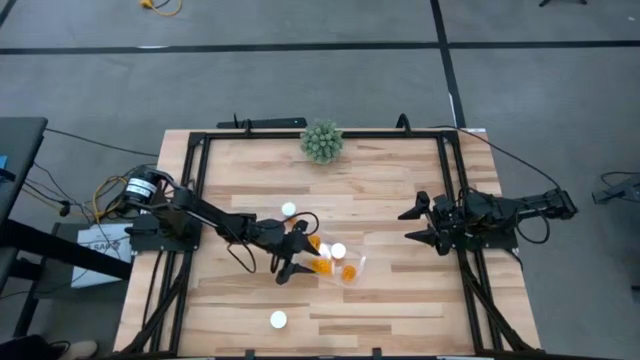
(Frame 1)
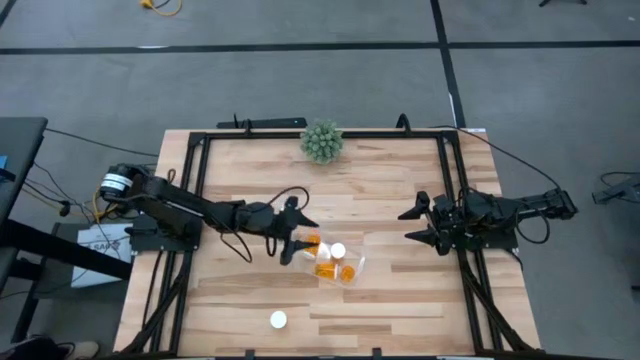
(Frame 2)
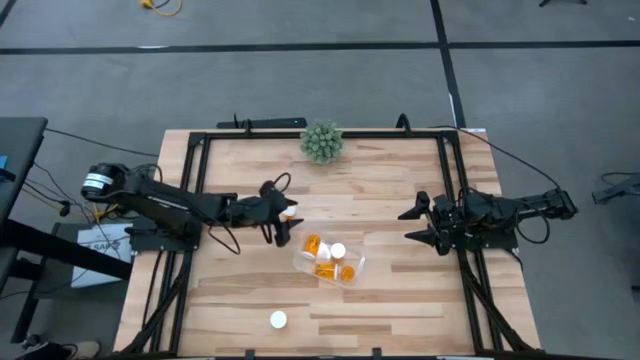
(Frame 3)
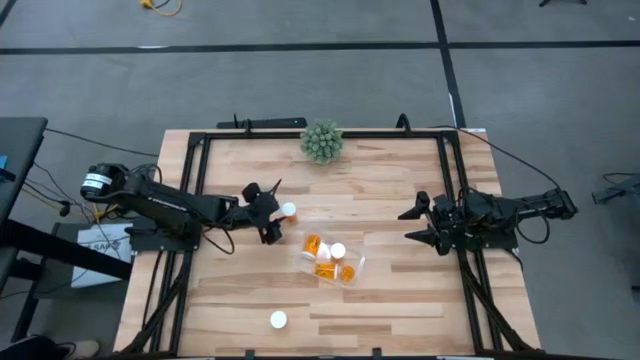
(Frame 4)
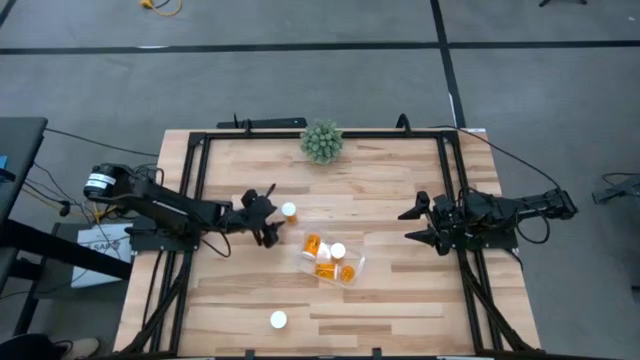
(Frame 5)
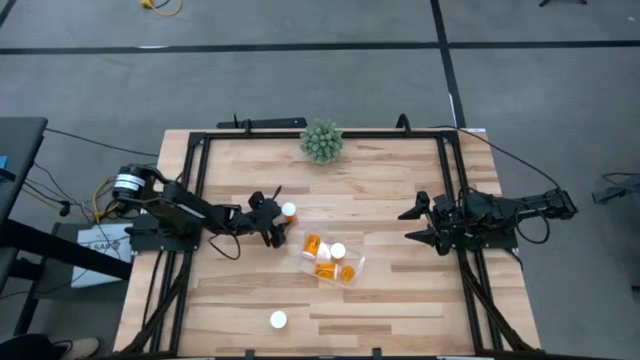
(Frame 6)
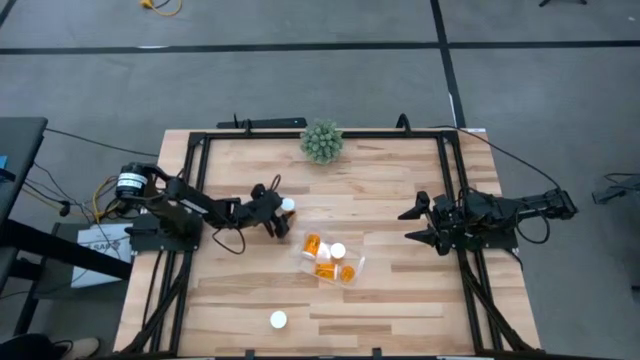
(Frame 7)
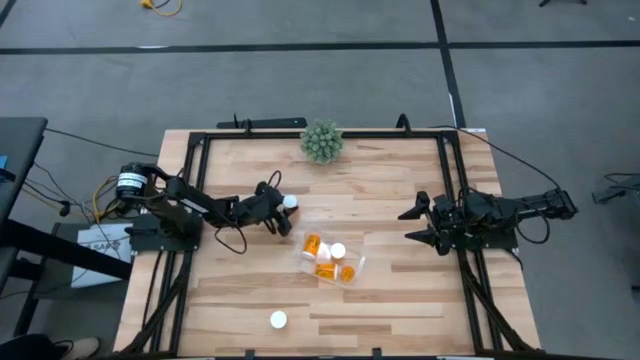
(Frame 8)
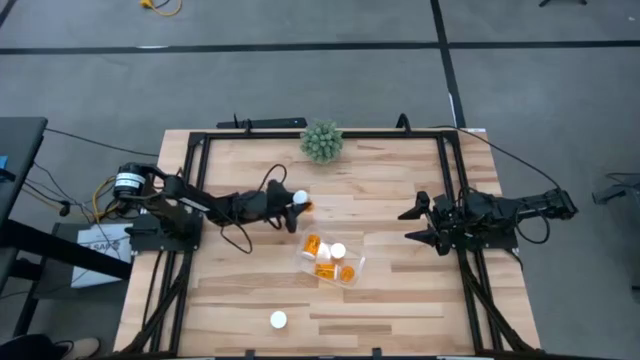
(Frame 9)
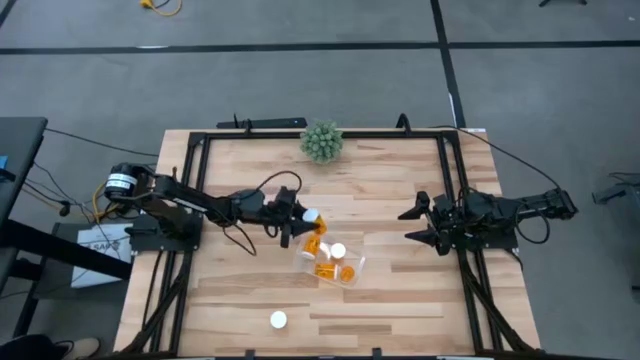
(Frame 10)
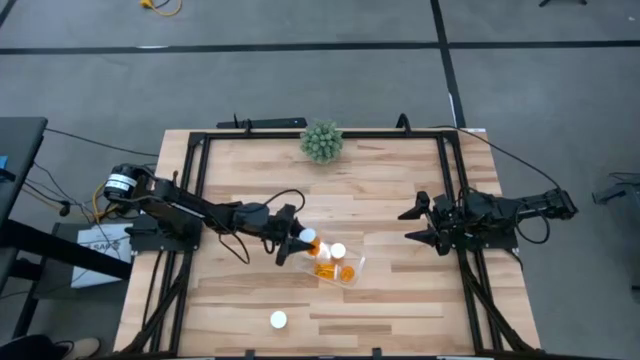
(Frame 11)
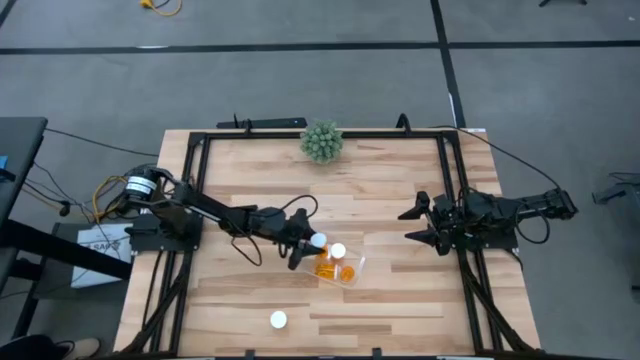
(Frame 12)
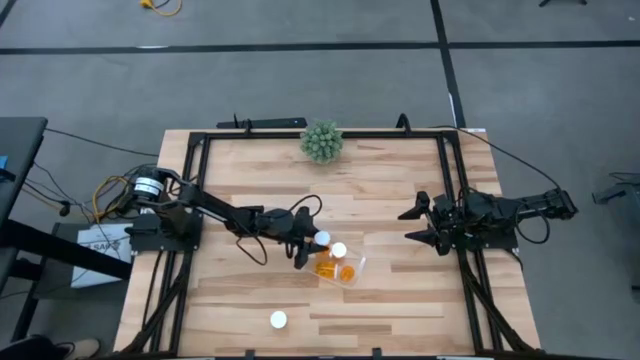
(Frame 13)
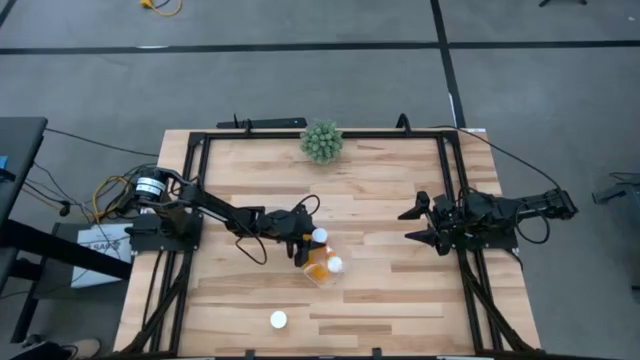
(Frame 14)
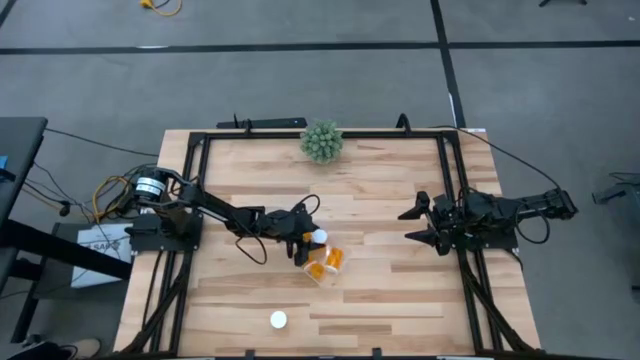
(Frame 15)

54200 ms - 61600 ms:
Task: Pick and place pill bottles into a basket
Put the orange pill bottle into the transparent bin

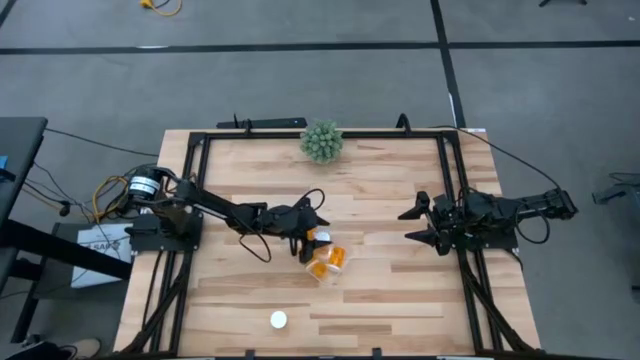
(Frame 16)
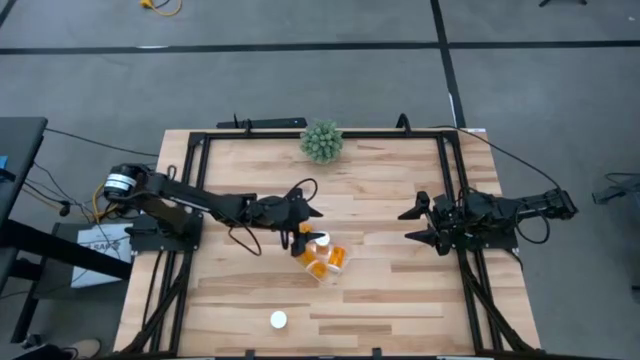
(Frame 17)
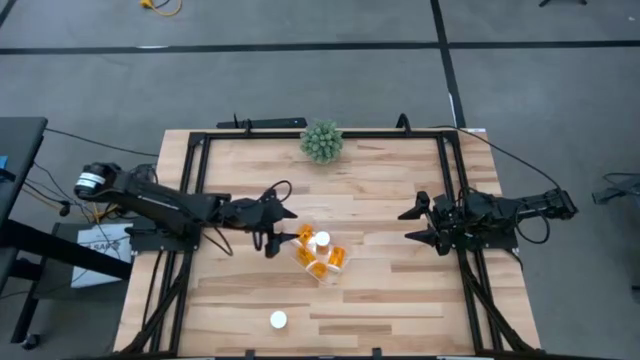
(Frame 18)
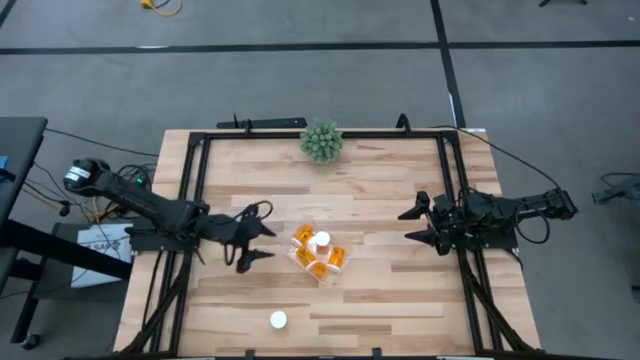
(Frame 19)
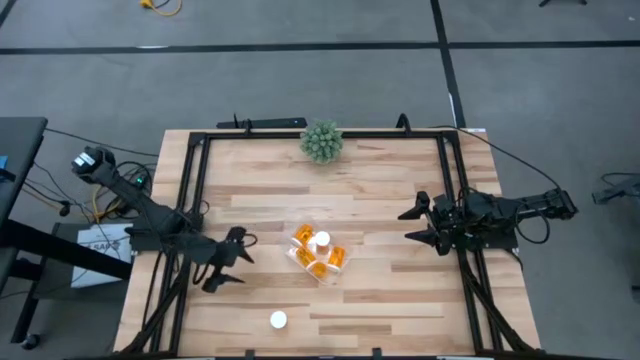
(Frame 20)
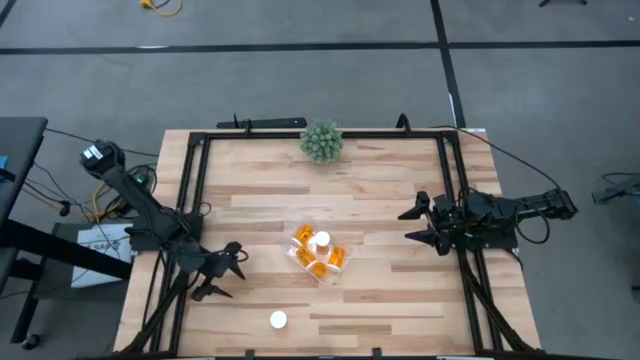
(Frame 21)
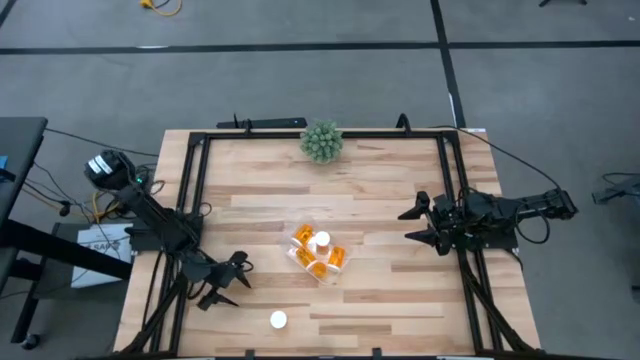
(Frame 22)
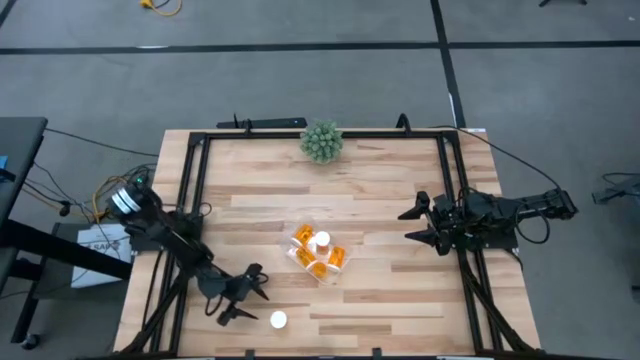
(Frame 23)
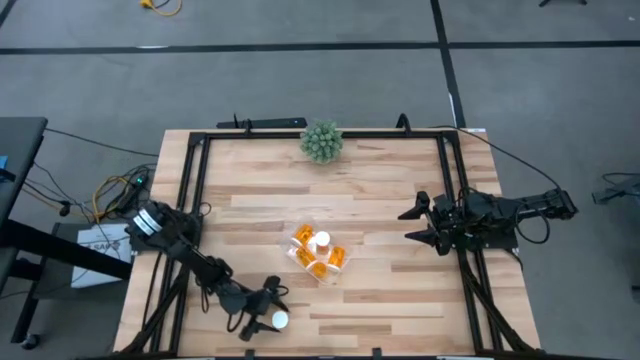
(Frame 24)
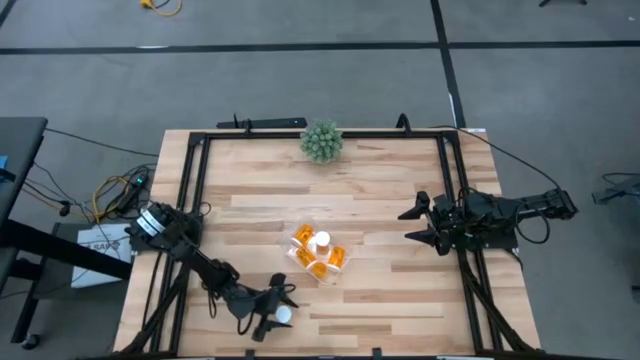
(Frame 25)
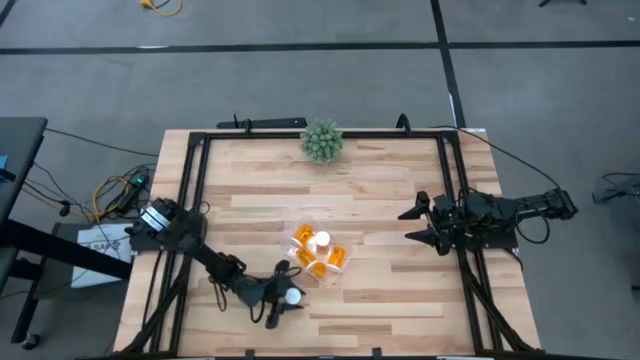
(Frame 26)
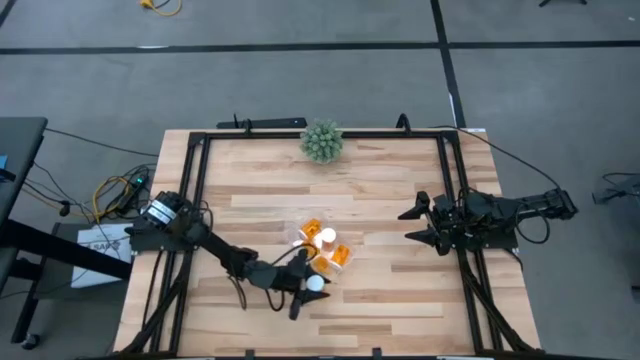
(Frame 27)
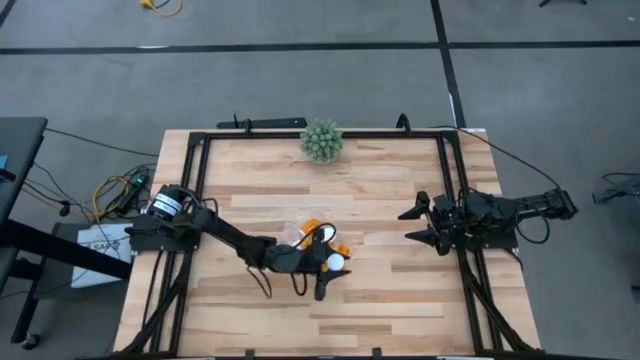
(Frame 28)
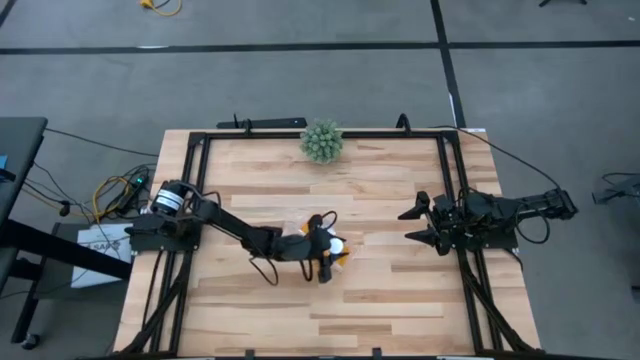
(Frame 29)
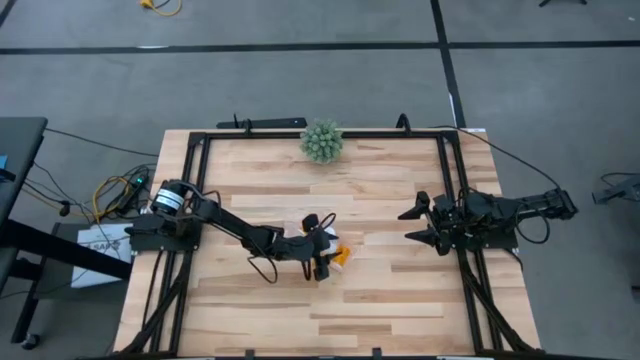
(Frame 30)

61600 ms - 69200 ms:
Put the orange pill bottle into the transparent bin

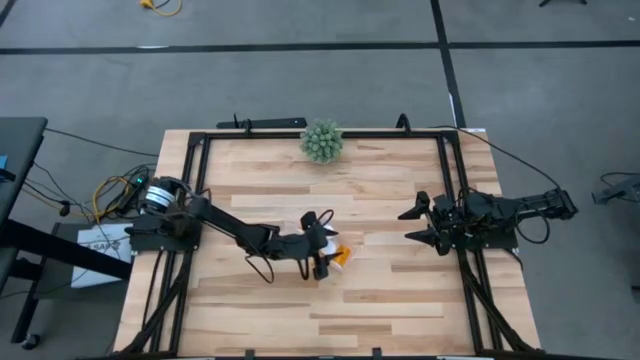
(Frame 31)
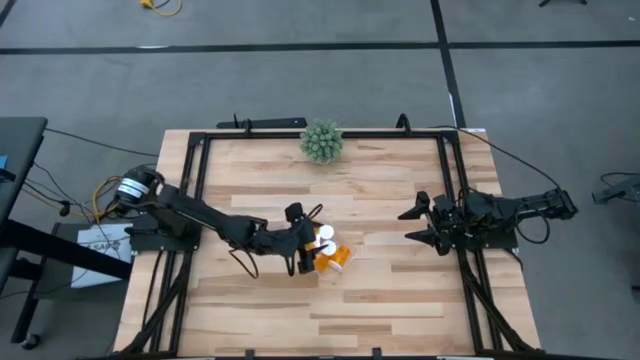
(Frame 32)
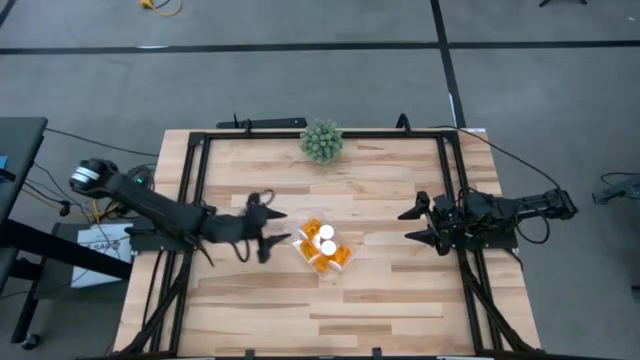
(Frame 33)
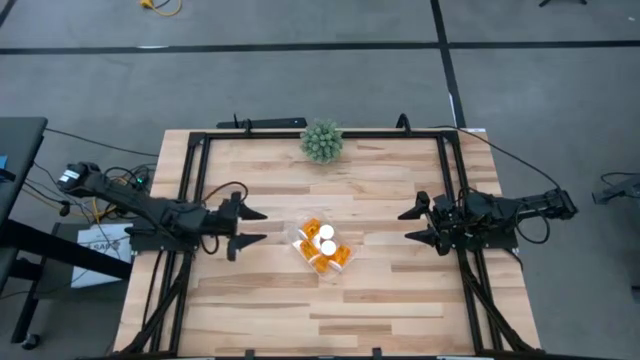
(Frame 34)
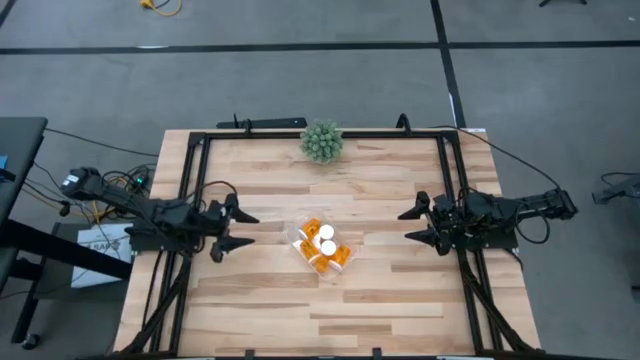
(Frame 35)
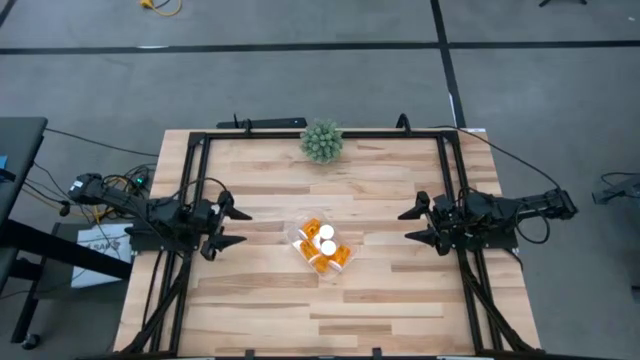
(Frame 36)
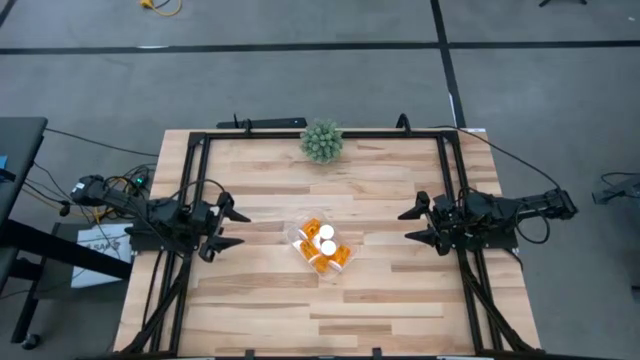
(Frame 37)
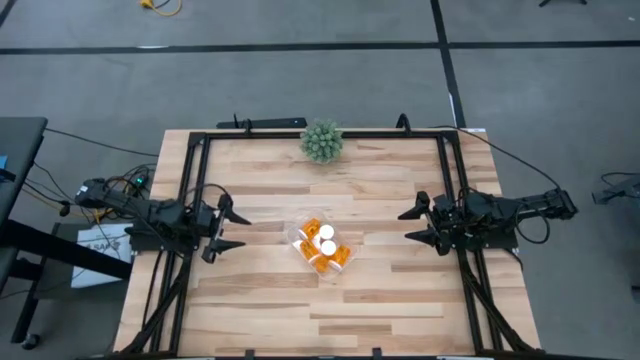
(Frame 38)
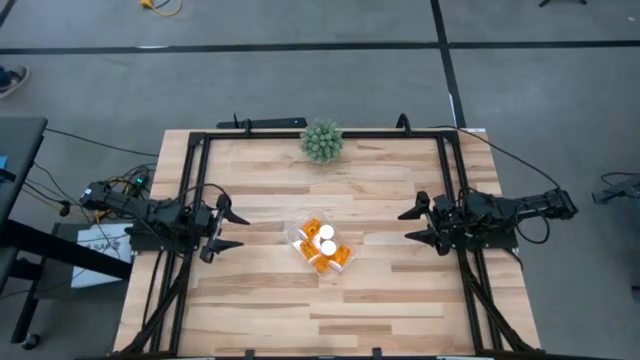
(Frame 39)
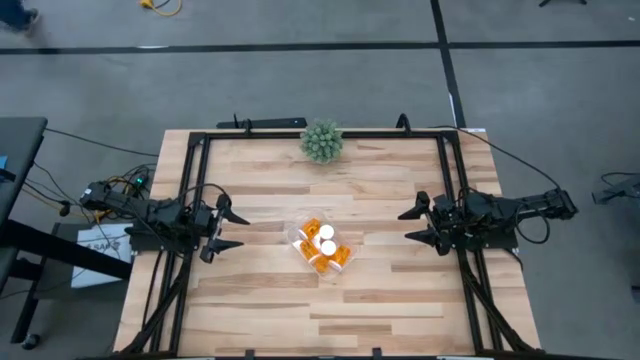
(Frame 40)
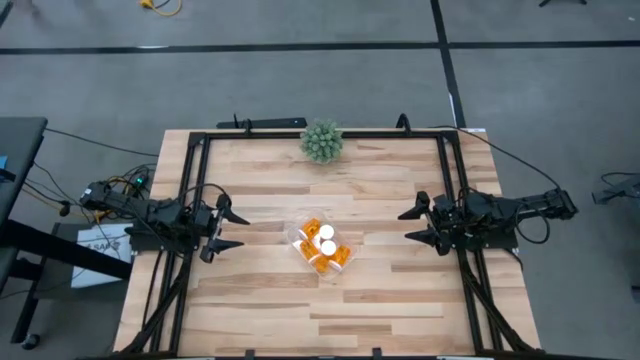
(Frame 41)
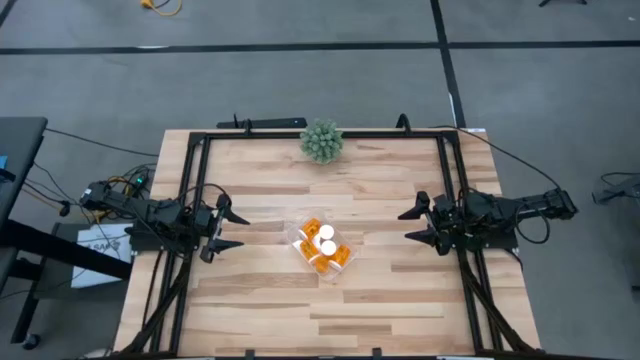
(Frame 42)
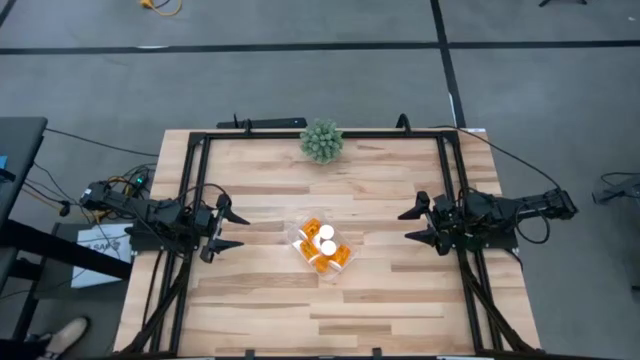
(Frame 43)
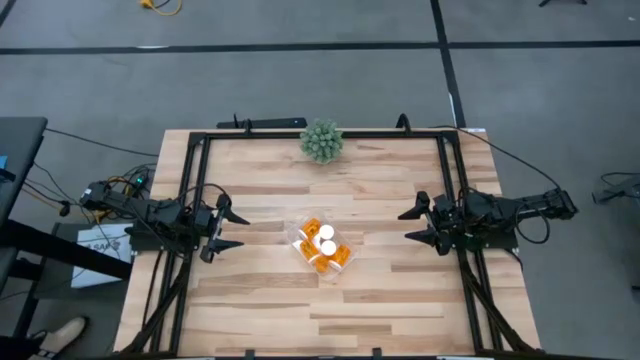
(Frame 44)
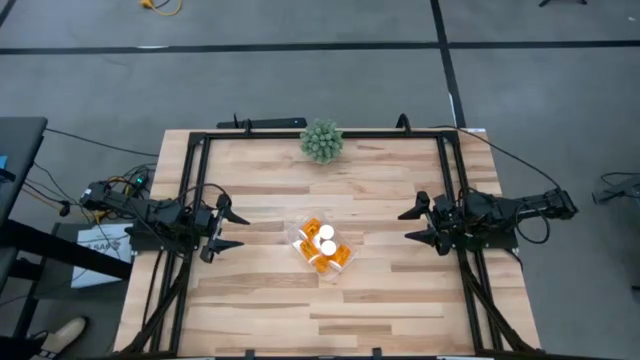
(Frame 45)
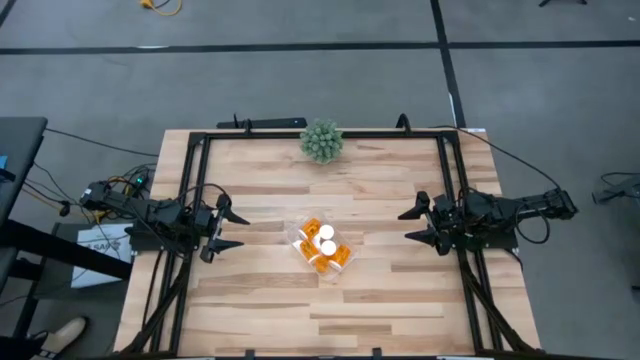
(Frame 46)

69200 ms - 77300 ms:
Return to Home Position
